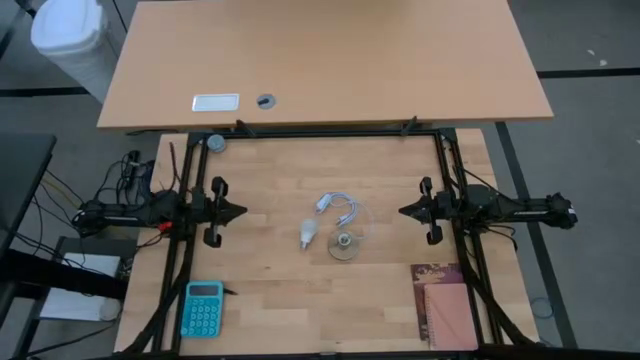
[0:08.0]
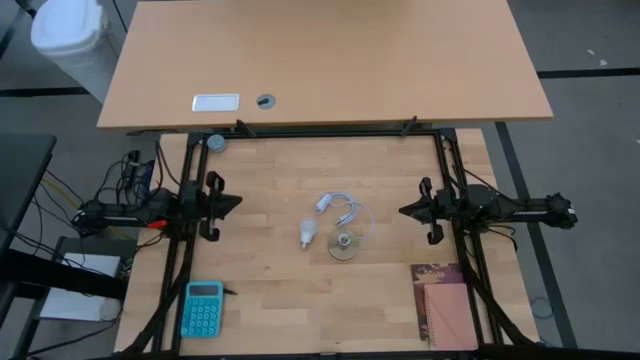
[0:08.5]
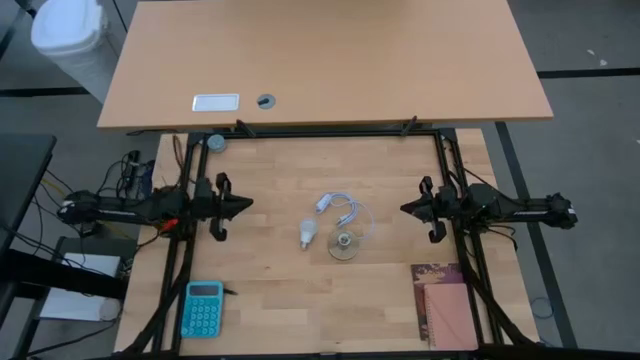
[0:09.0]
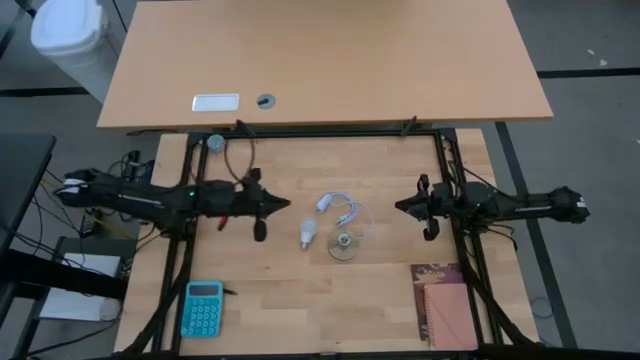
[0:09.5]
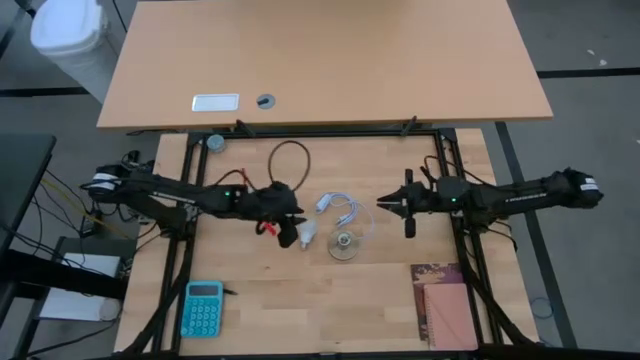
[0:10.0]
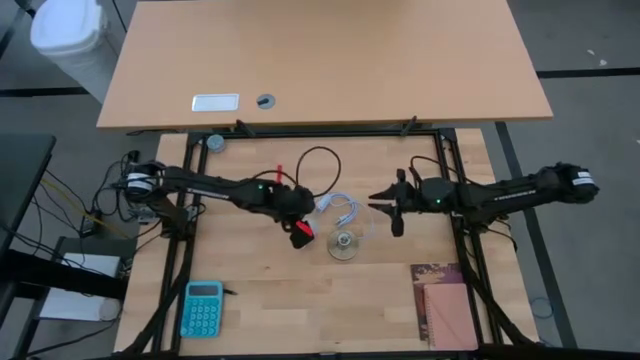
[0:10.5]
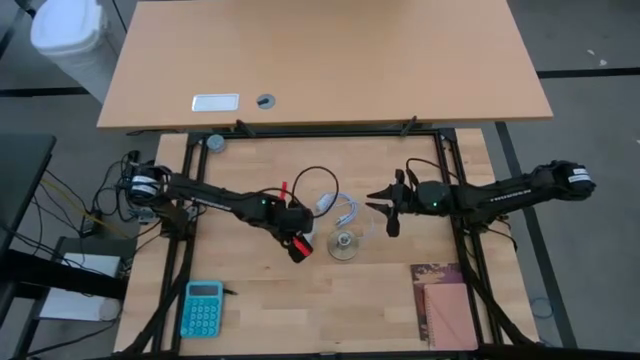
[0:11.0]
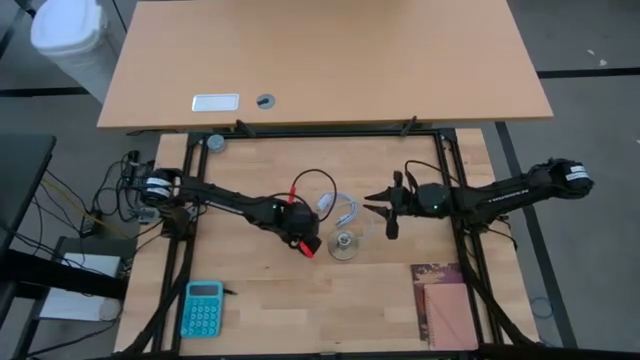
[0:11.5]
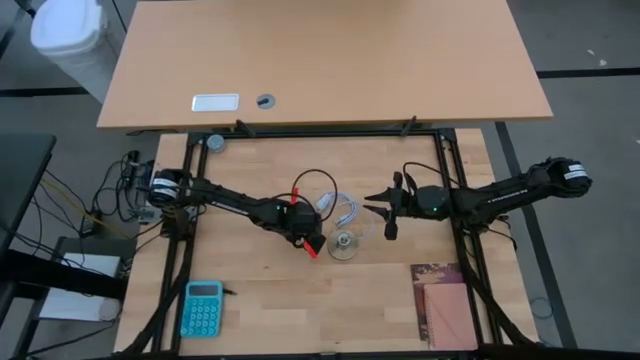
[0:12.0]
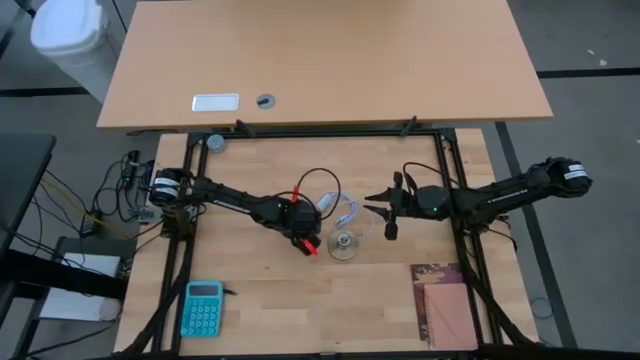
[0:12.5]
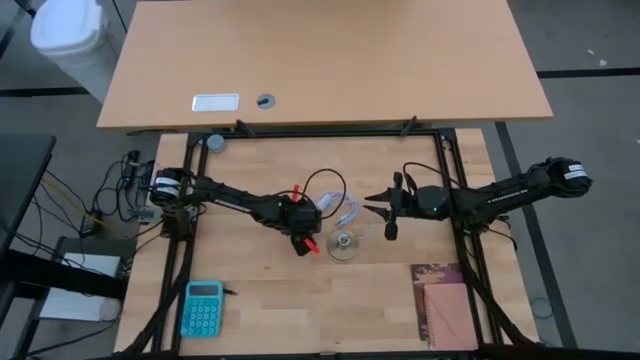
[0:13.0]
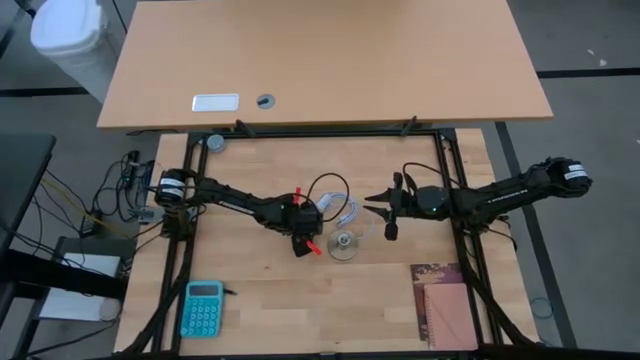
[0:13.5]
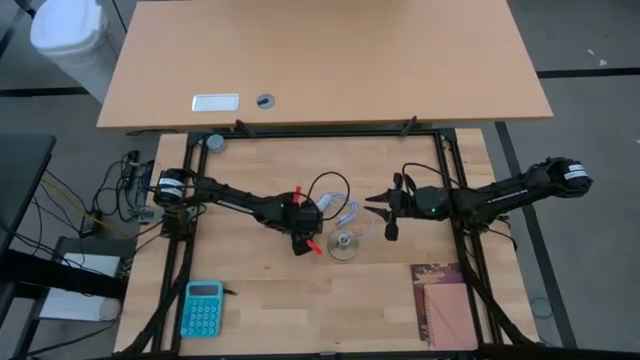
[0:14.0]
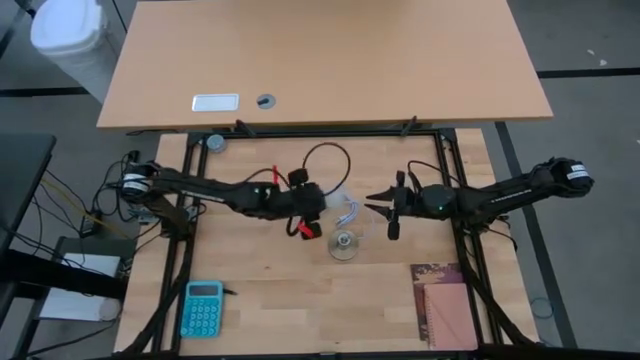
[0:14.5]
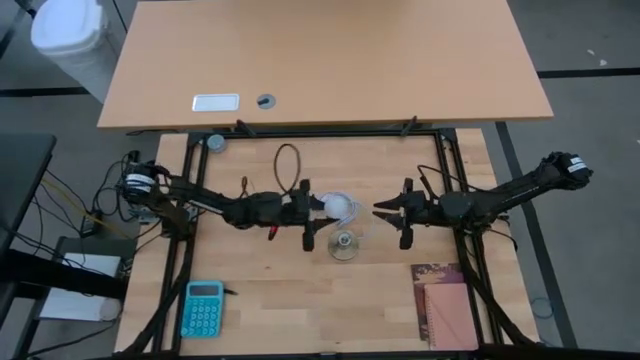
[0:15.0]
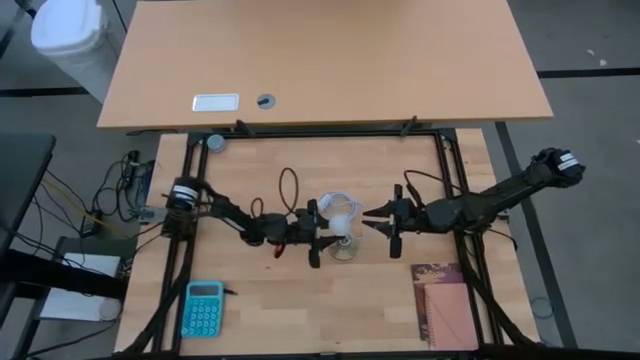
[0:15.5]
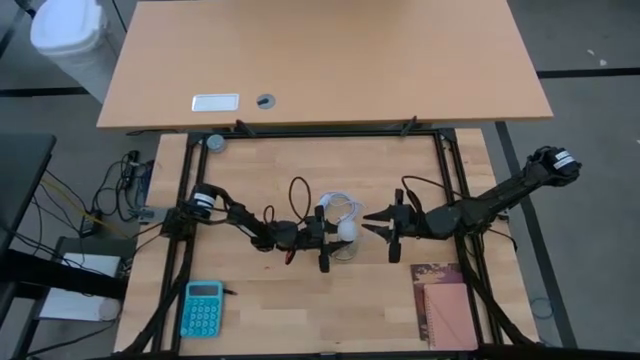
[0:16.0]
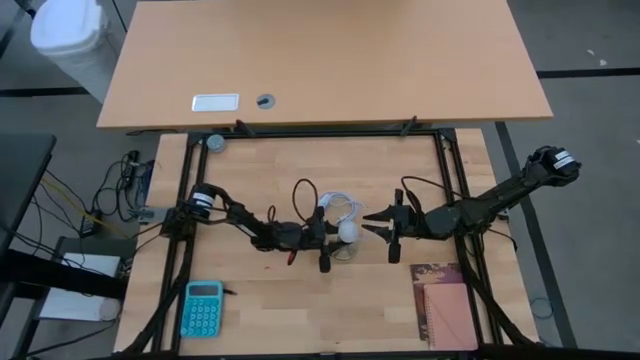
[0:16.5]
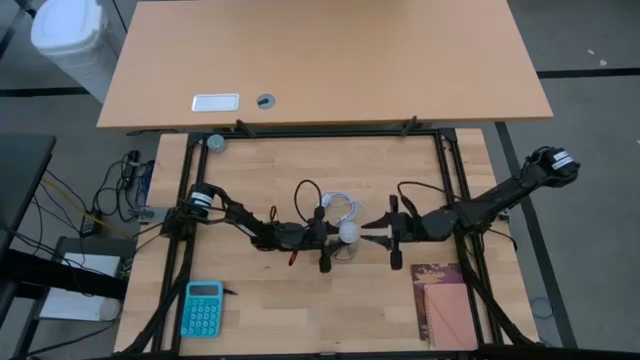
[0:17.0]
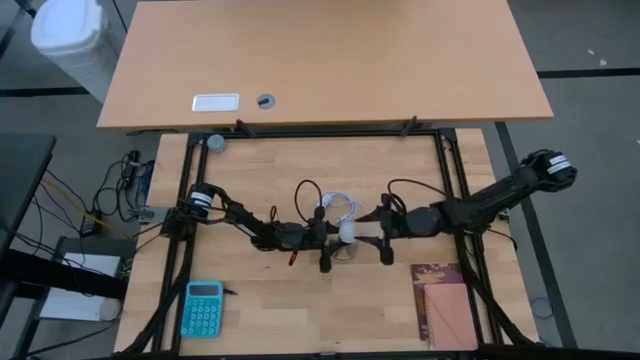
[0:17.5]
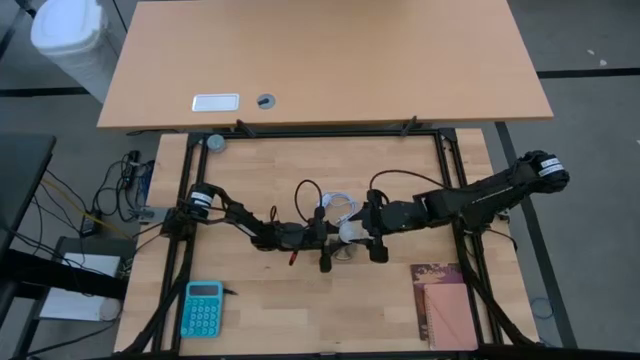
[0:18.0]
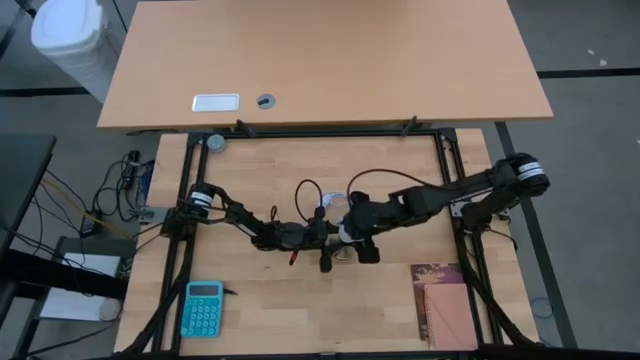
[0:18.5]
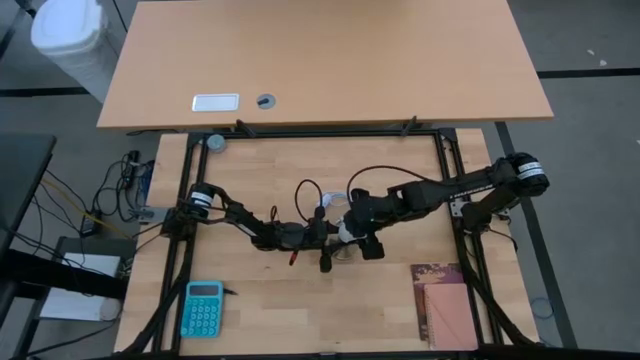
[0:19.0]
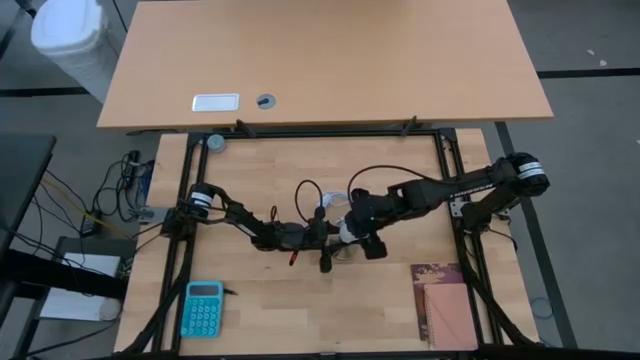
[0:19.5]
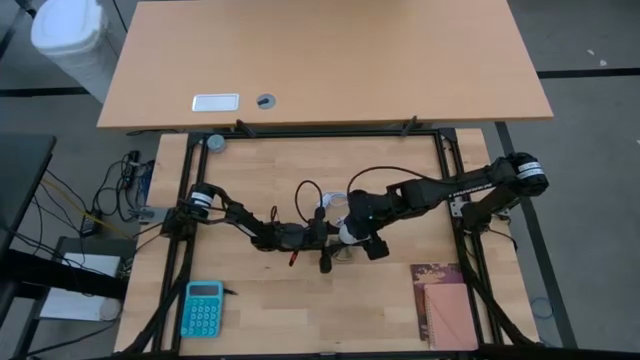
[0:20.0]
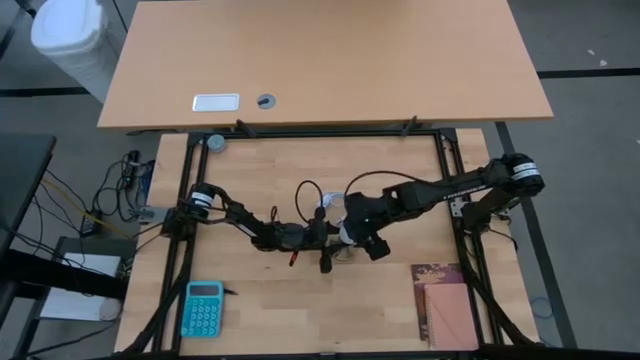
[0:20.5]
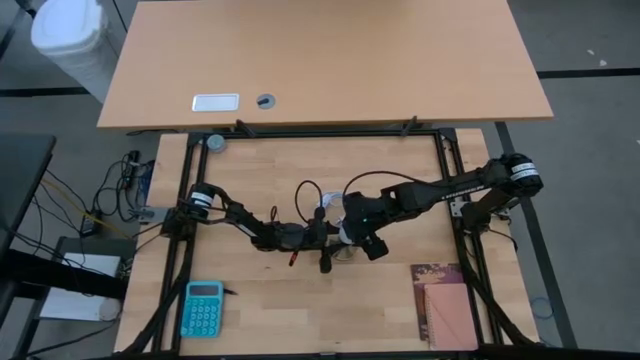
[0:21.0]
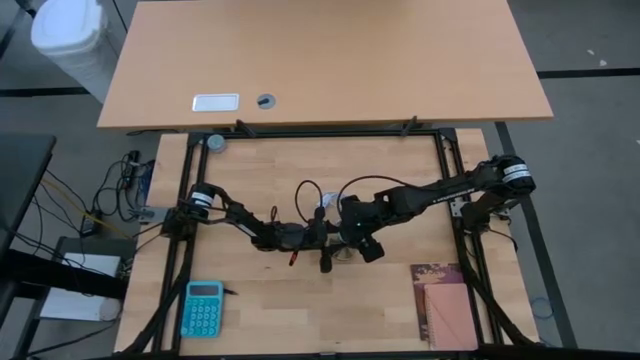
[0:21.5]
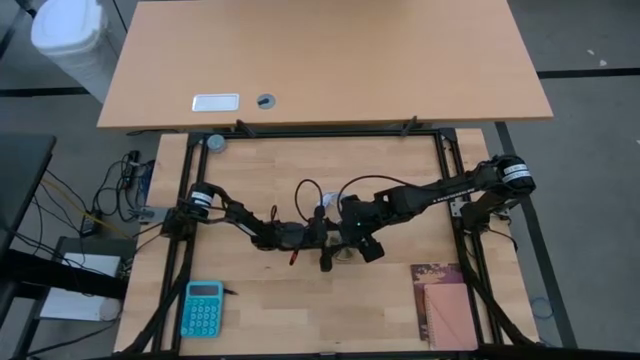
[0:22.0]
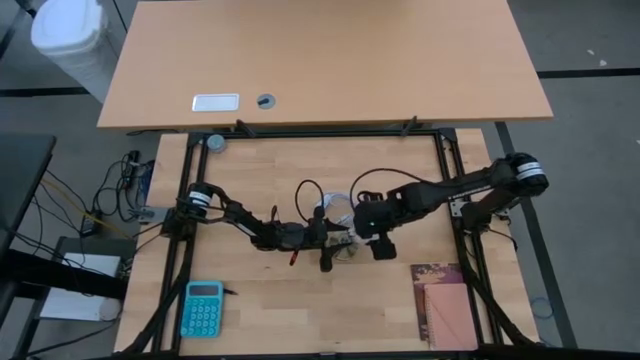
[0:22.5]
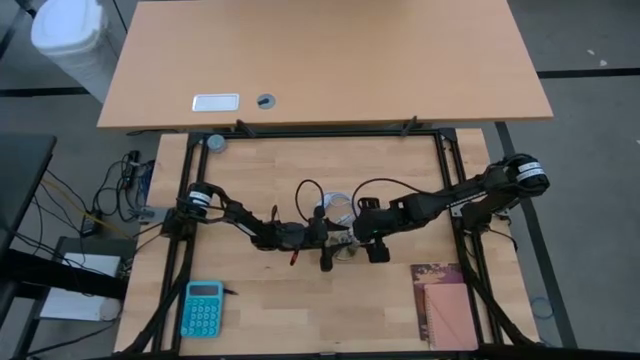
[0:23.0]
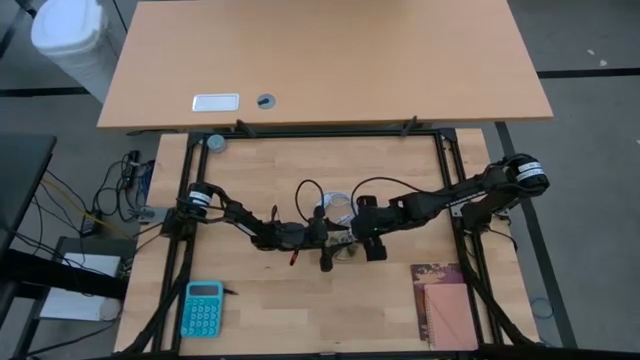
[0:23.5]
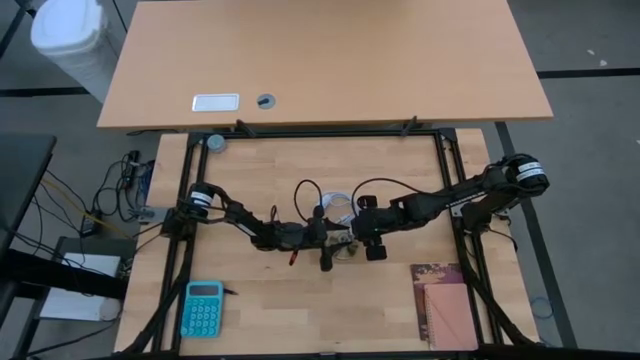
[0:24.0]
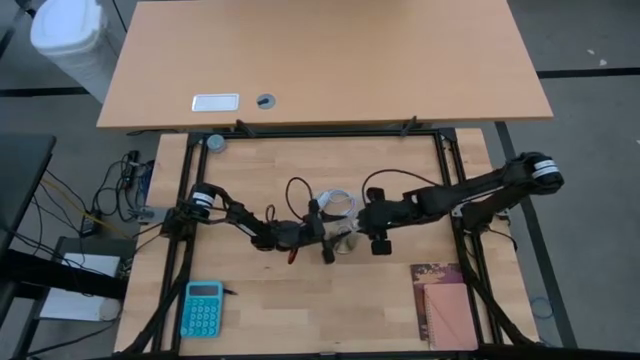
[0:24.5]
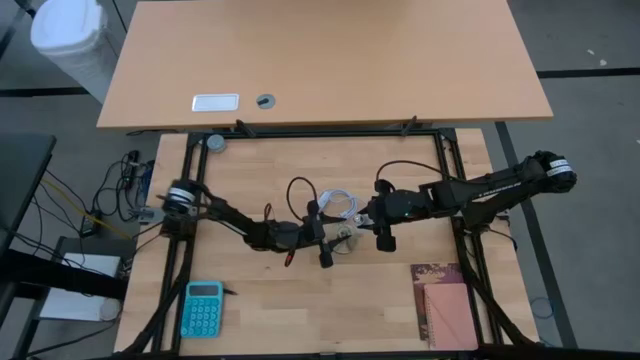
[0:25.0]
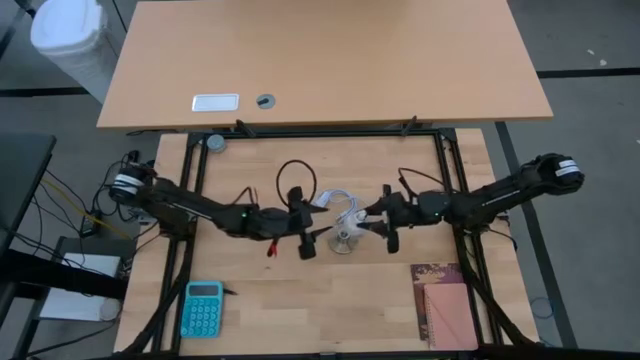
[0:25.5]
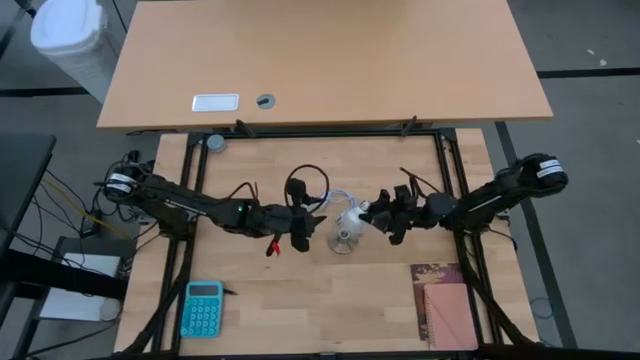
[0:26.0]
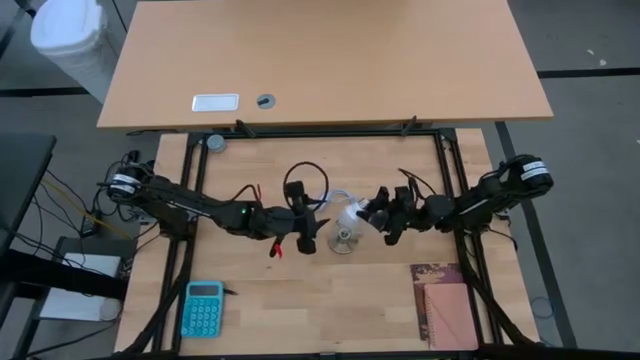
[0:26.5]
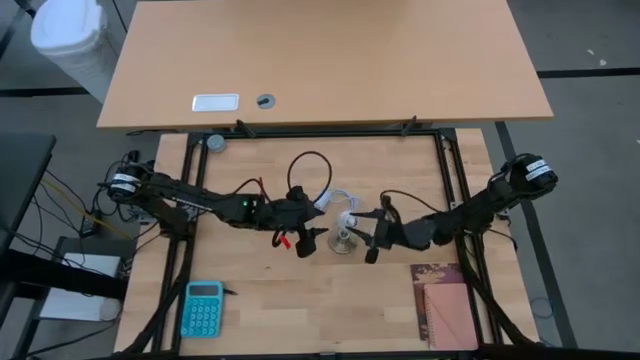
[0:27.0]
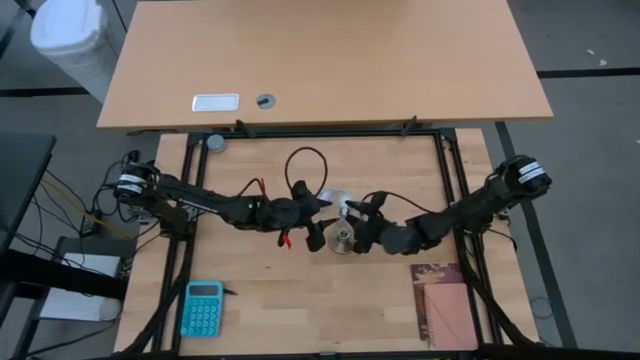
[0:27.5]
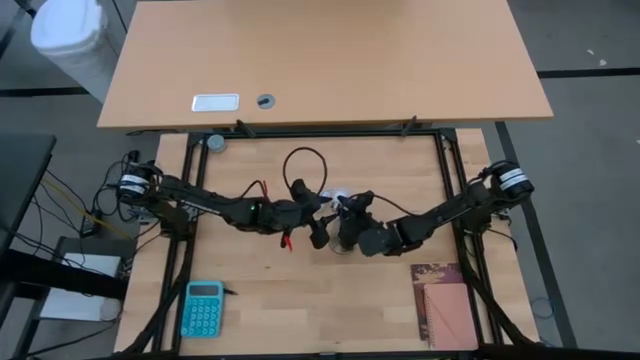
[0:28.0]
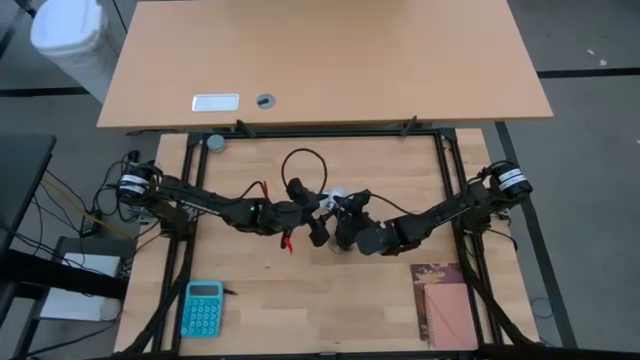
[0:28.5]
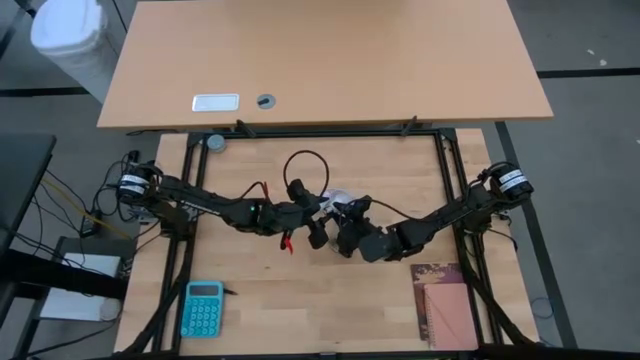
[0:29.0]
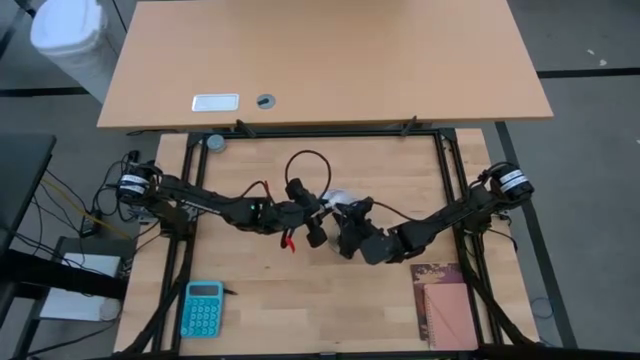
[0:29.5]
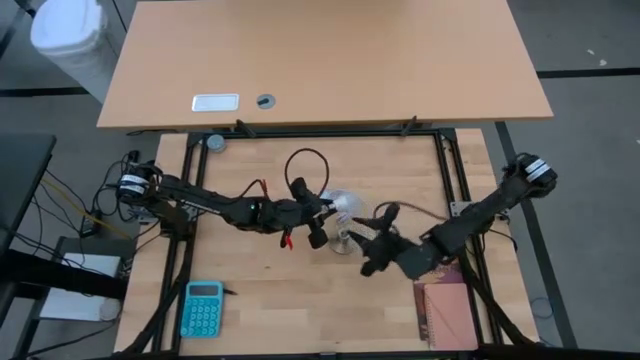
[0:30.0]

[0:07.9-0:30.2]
Task: Screw lightbulb
Insert the white lightbulb into the lamp socket
